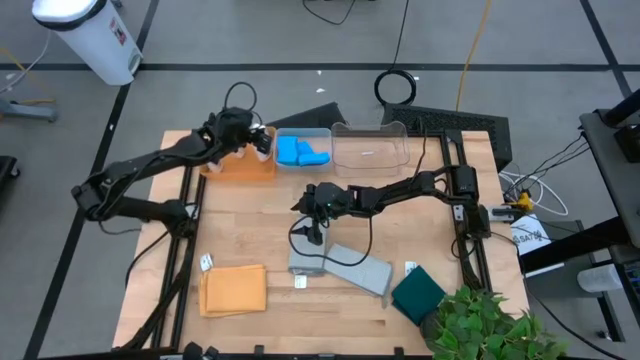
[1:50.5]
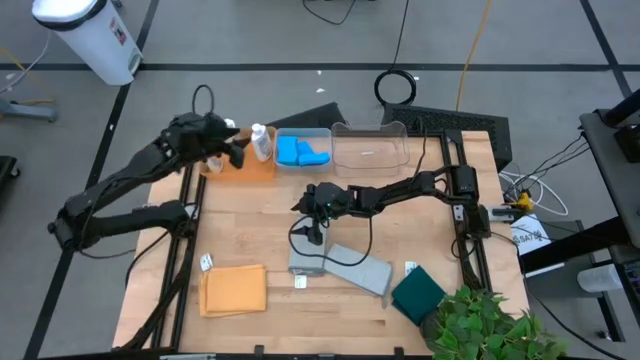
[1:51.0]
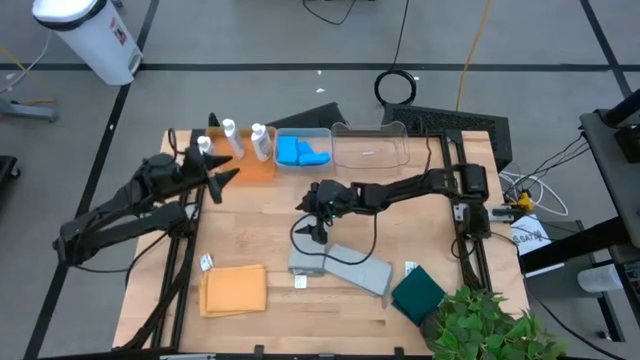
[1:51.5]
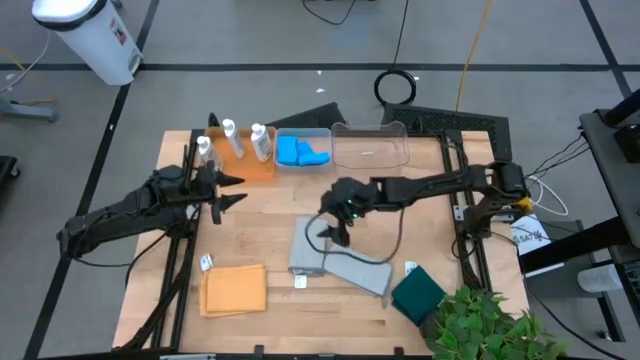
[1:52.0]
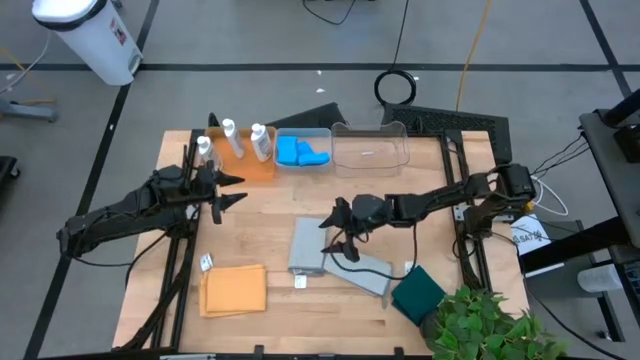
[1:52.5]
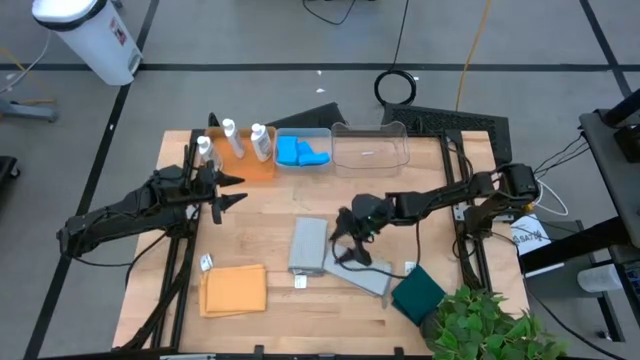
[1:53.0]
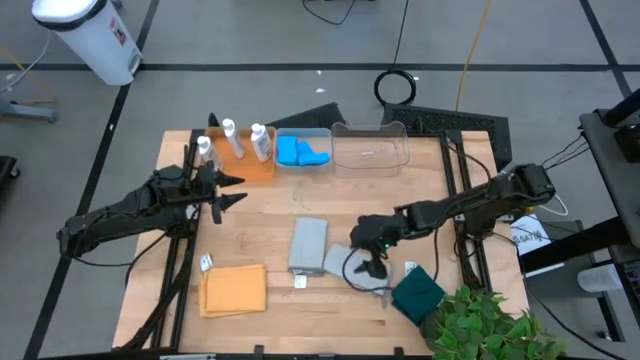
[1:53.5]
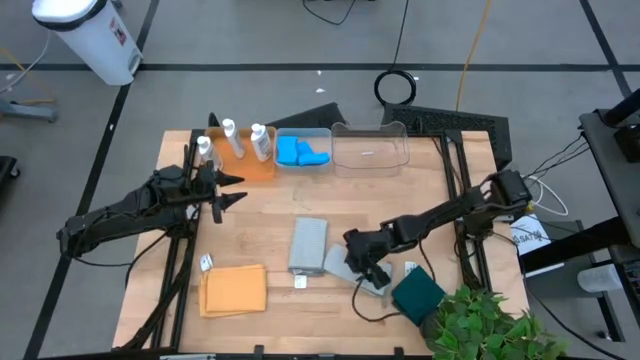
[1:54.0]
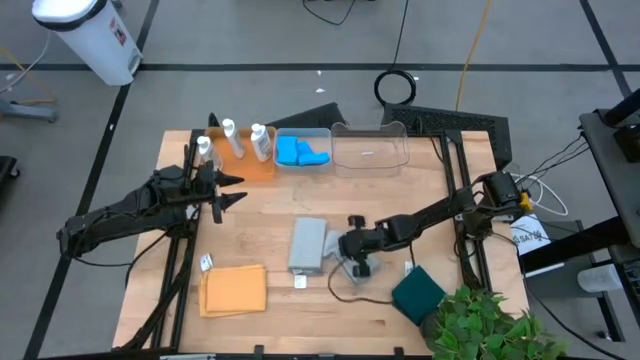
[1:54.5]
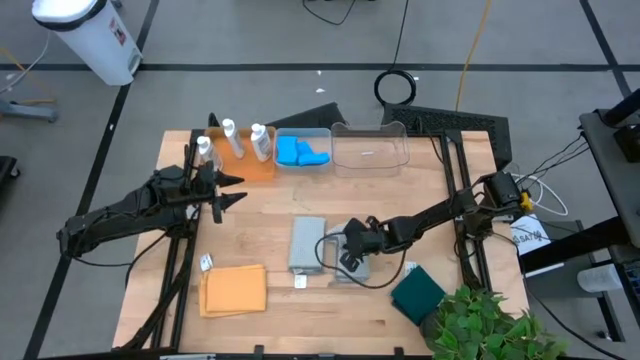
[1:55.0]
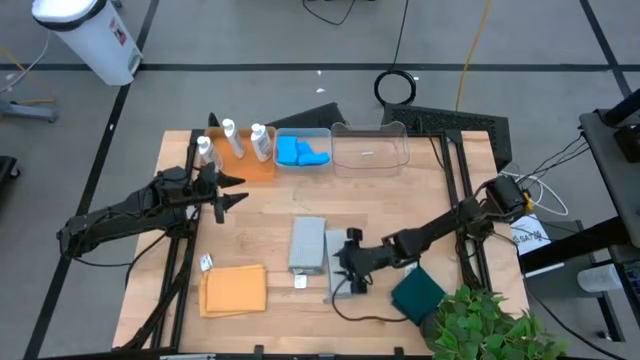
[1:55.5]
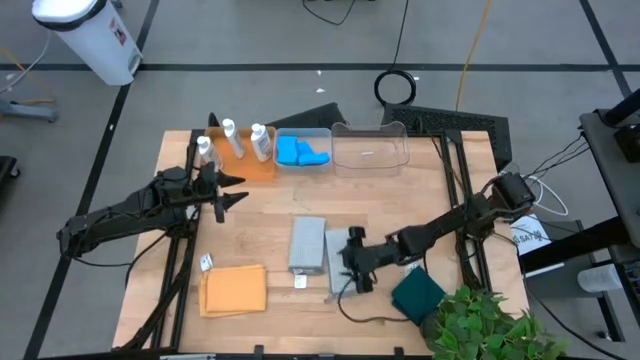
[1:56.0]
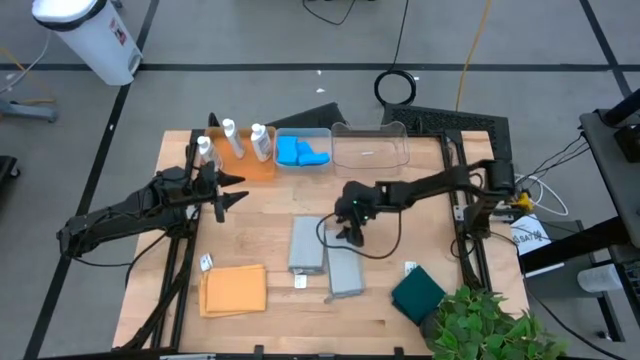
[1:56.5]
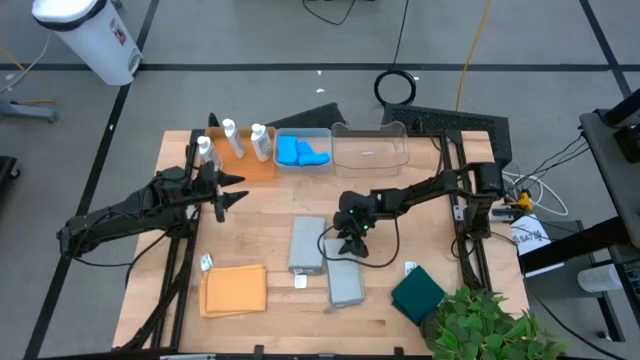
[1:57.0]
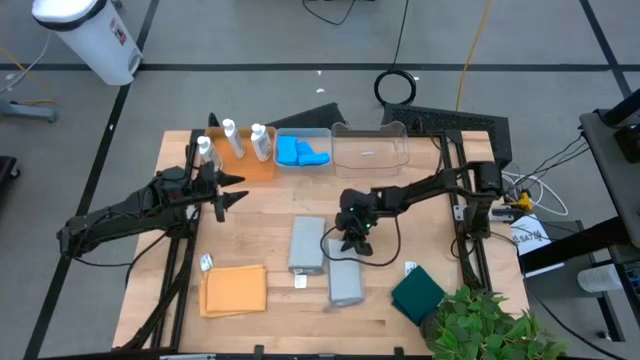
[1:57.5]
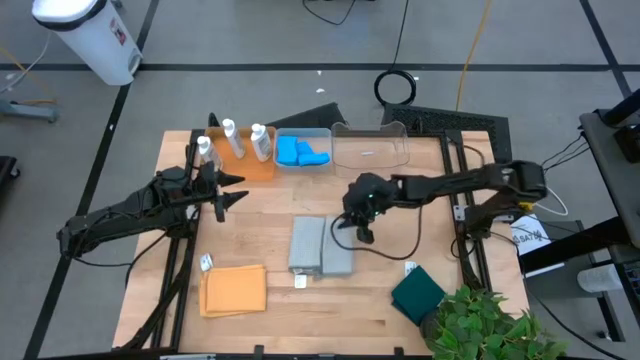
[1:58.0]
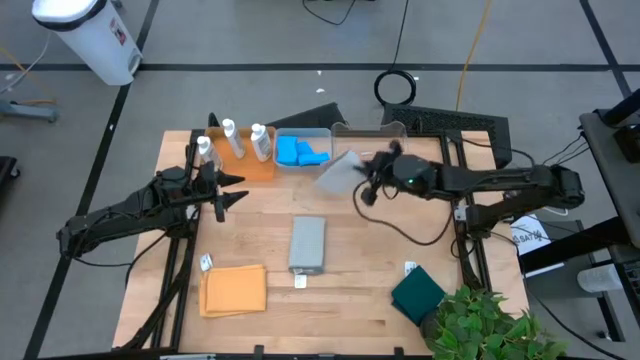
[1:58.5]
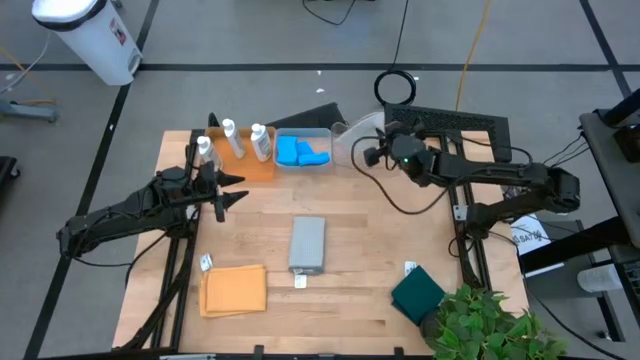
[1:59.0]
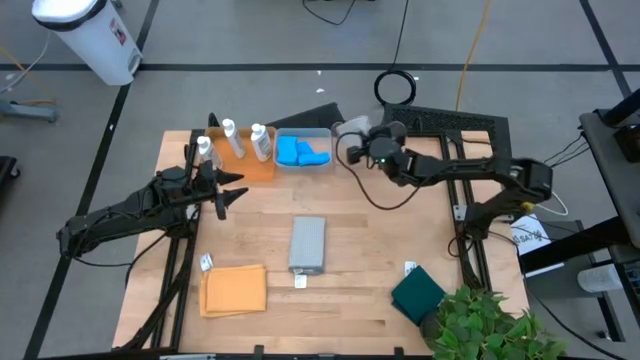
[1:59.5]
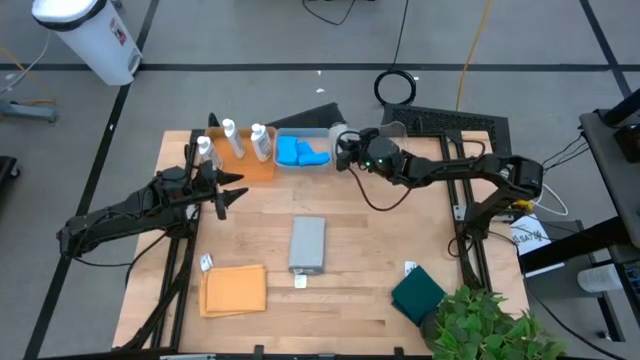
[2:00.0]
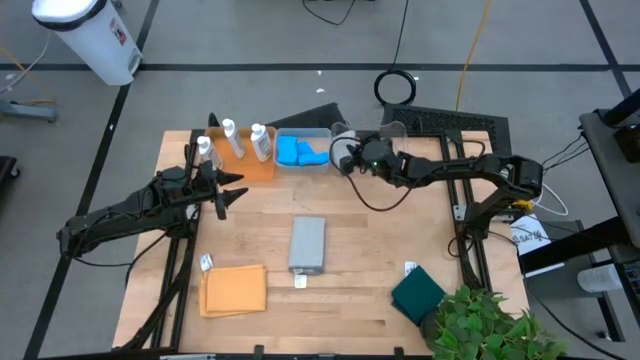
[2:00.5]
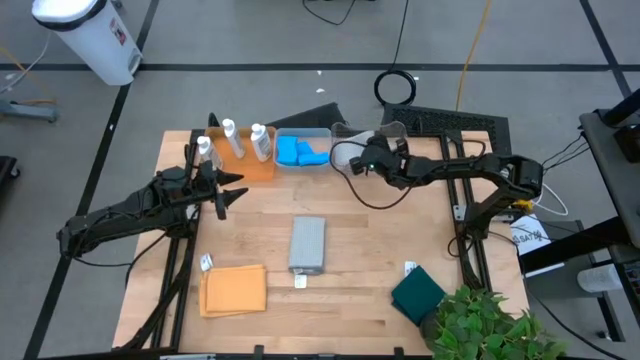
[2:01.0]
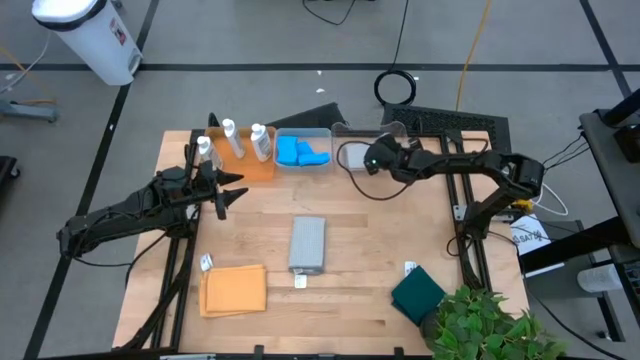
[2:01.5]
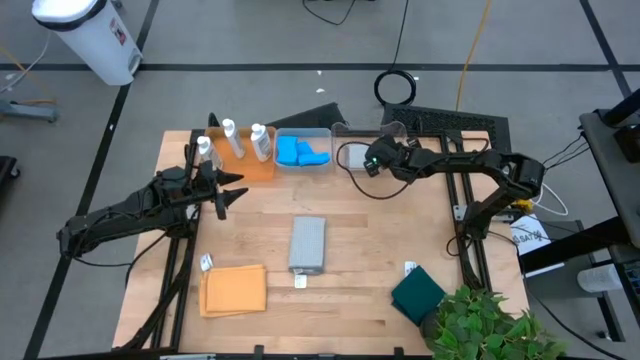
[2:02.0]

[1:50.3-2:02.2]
Task: Pick & Place Kitchen Items
Put the gray towel into the right transparent bin

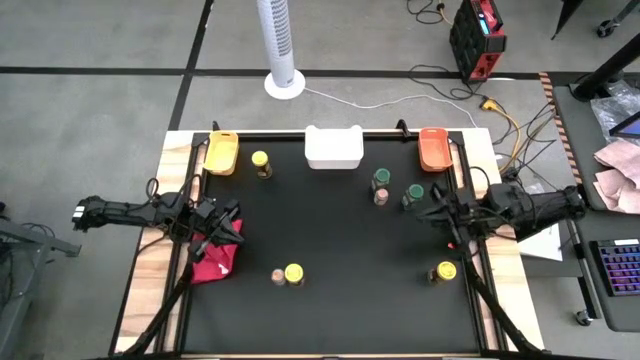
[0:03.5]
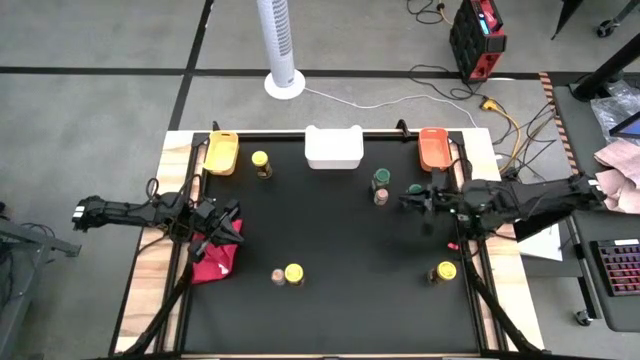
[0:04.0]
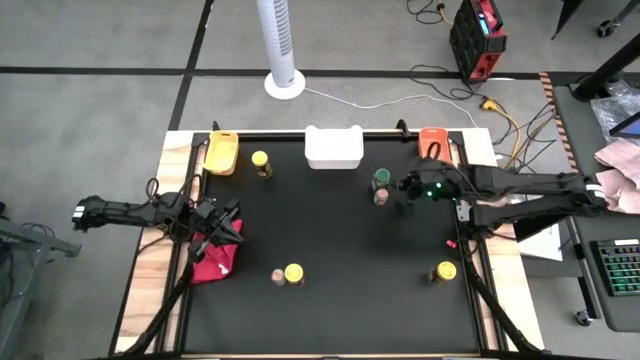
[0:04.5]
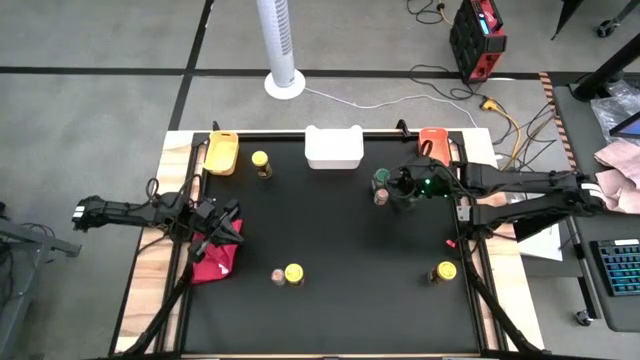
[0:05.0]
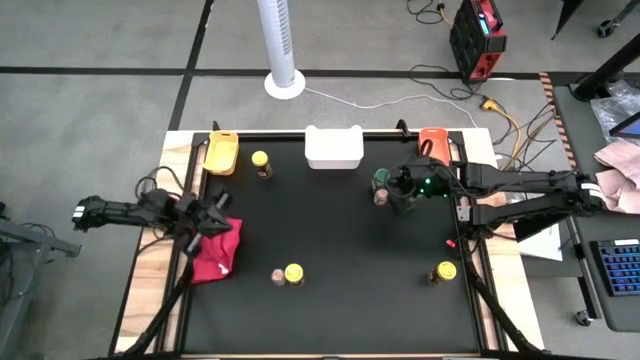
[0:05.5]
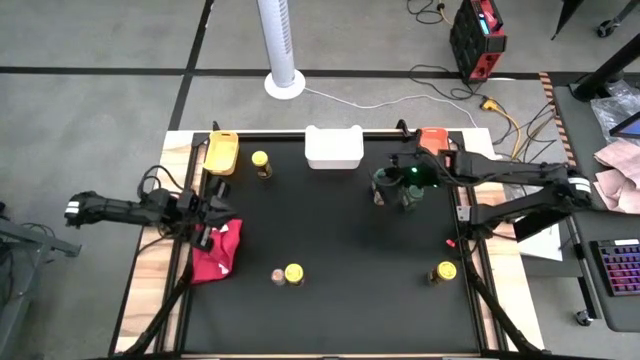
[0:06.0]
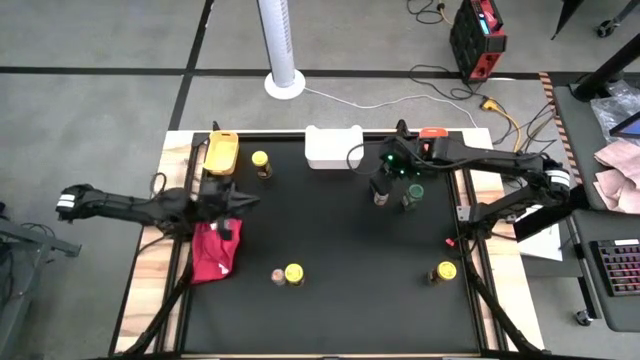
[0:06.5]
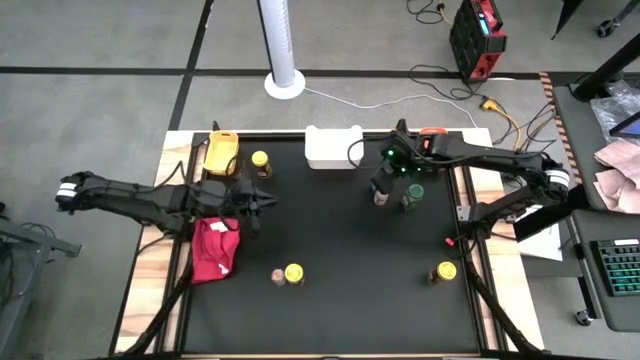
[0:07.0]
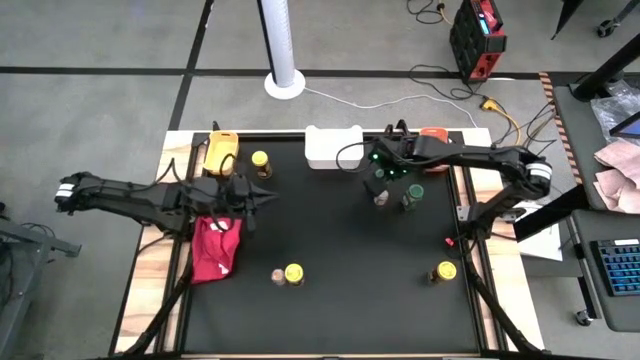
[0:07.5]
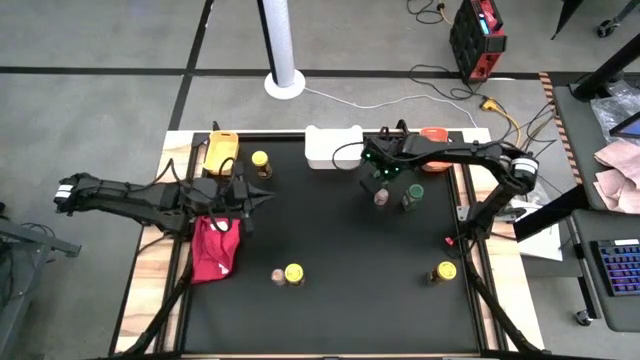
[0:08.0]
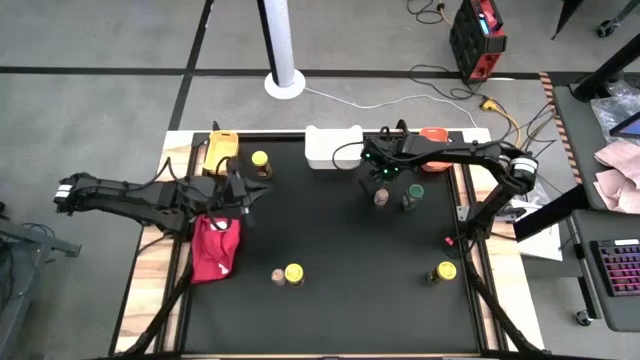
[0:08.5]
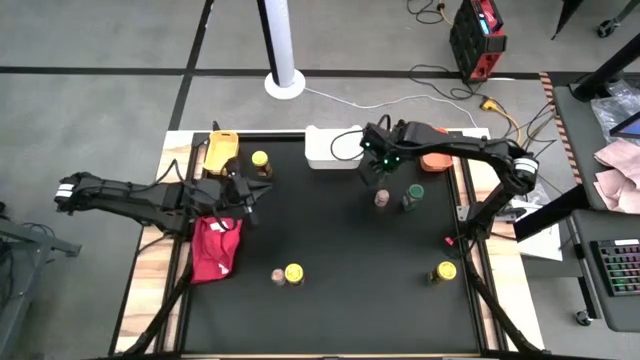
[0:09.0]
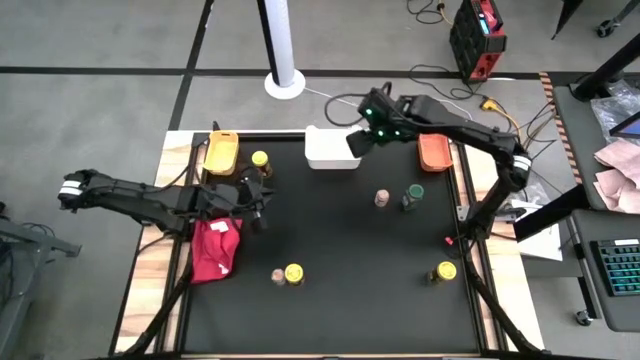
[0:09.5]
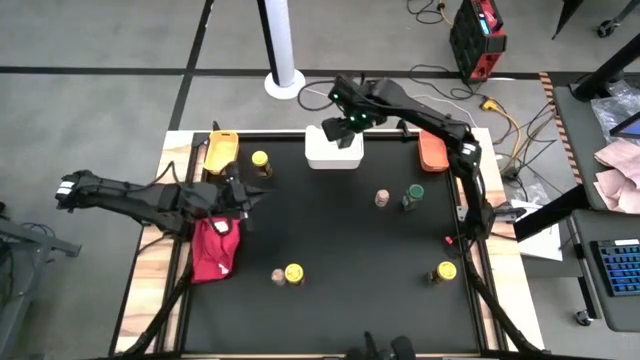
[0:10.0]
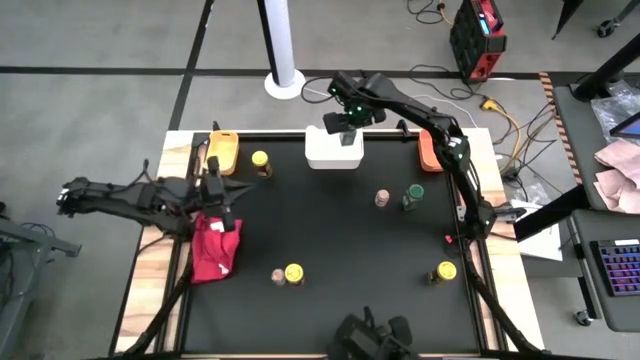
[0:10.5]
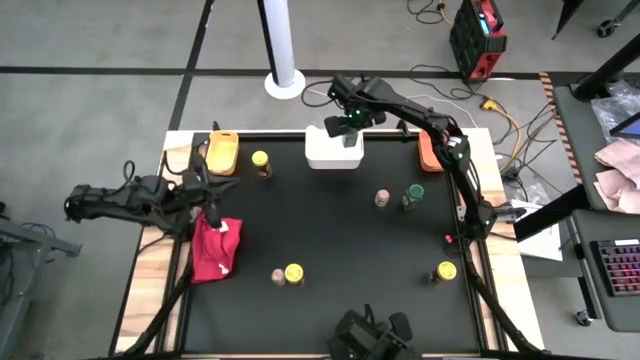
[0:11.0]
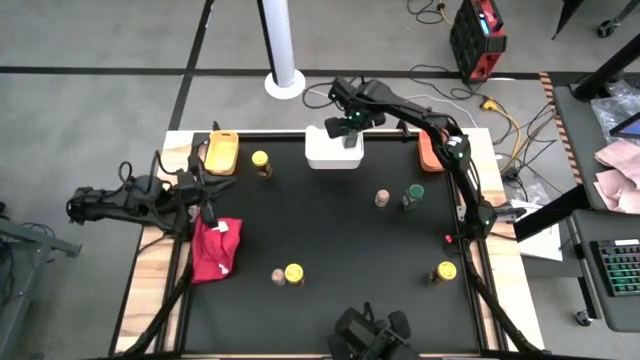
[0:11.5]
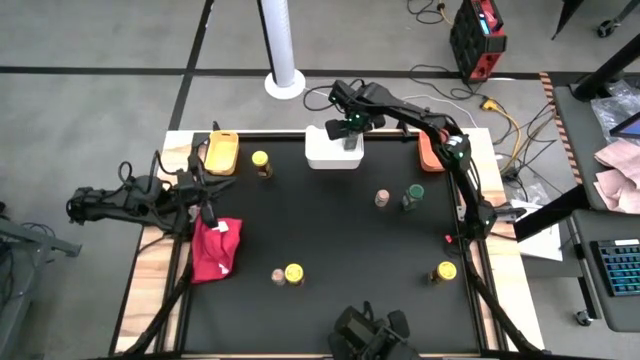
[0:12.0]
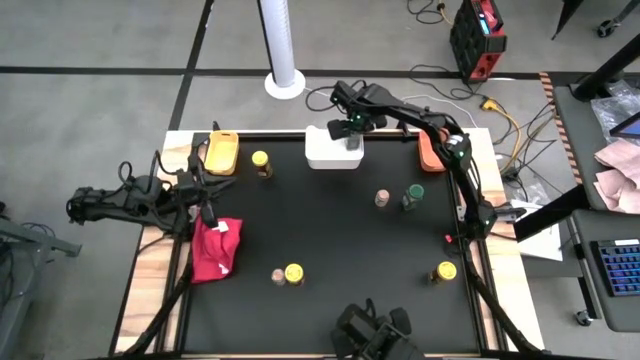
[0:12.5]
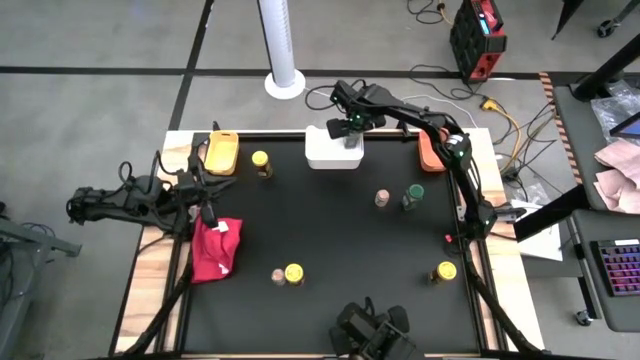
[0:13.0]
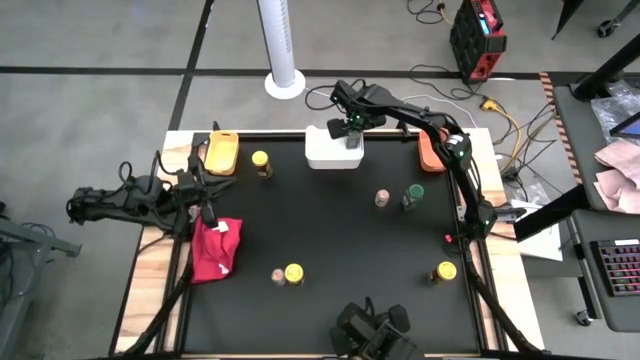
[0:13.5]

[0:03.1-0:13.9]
Task: Sort spices by type
Put the left green spice bottle into the white bin
